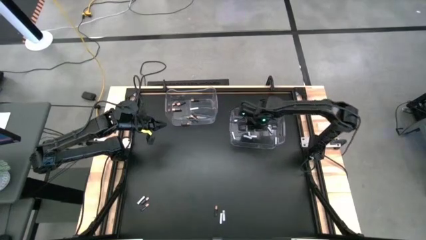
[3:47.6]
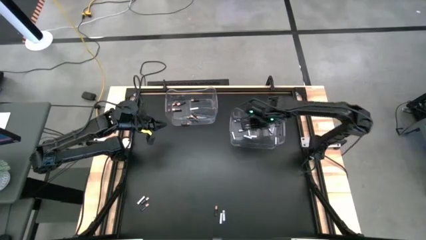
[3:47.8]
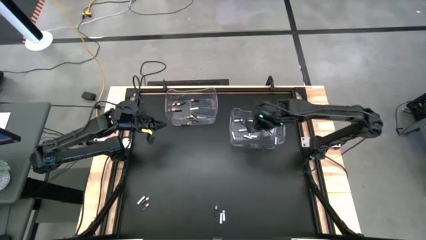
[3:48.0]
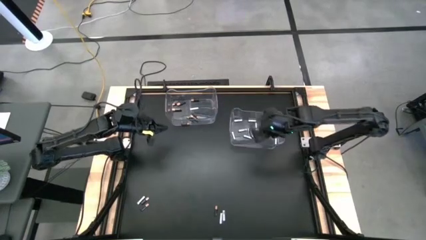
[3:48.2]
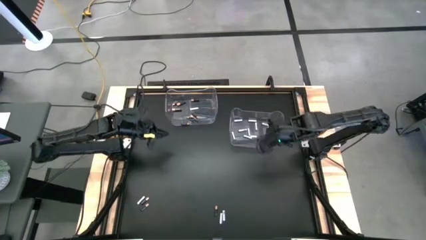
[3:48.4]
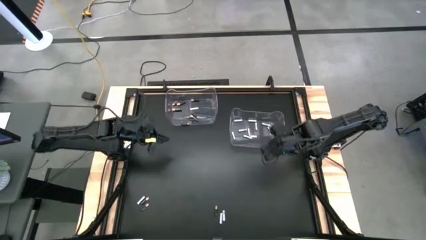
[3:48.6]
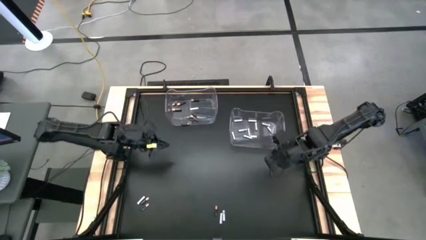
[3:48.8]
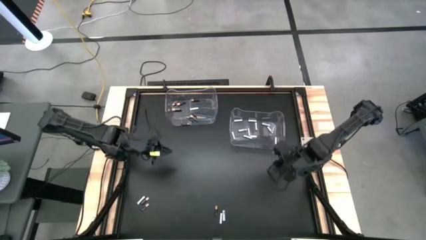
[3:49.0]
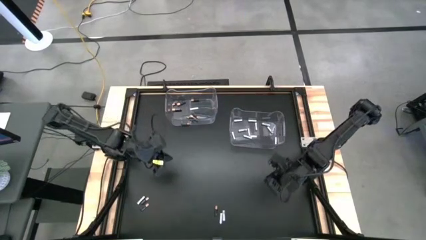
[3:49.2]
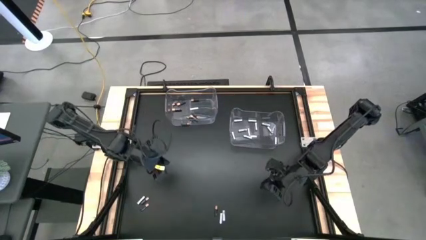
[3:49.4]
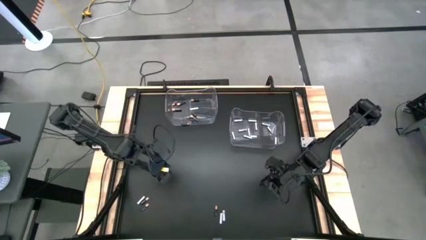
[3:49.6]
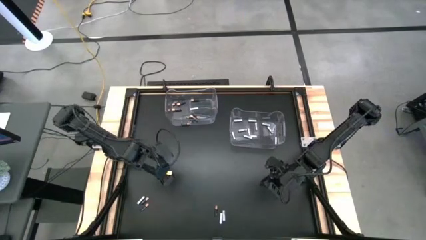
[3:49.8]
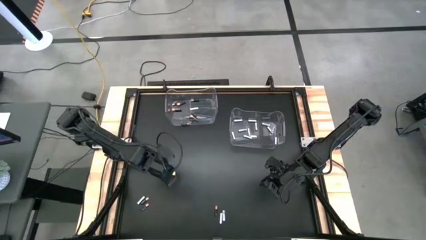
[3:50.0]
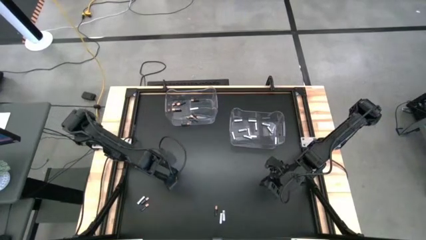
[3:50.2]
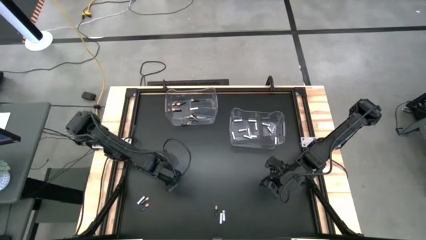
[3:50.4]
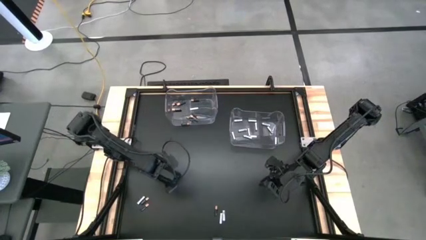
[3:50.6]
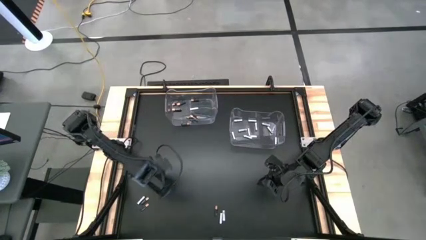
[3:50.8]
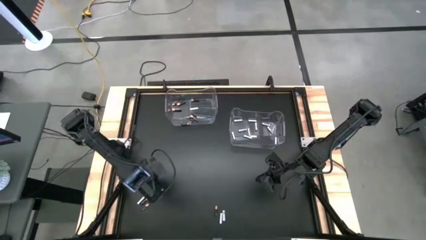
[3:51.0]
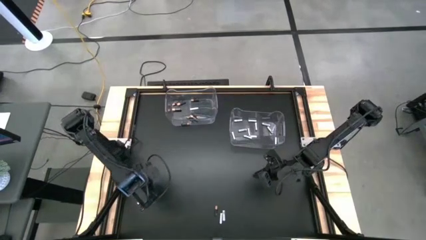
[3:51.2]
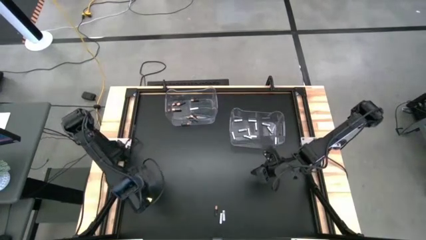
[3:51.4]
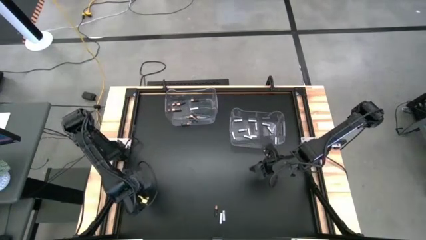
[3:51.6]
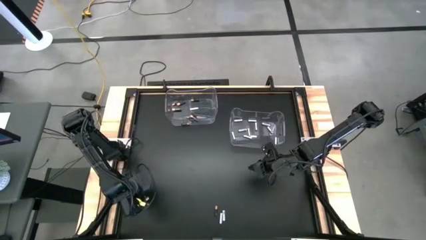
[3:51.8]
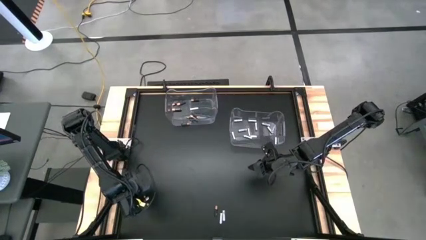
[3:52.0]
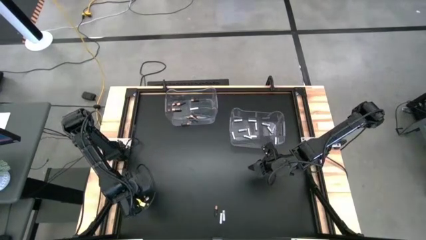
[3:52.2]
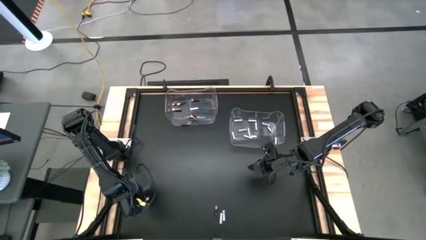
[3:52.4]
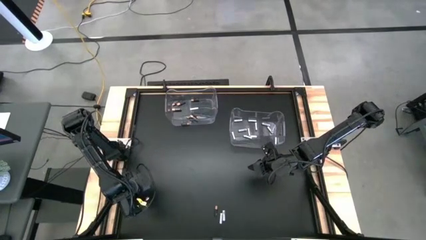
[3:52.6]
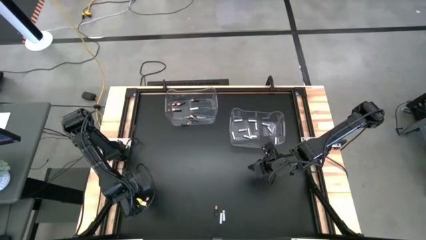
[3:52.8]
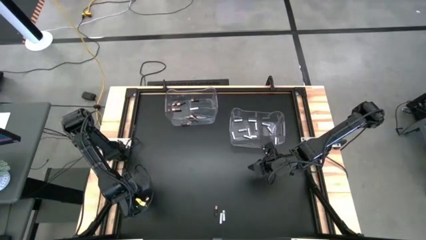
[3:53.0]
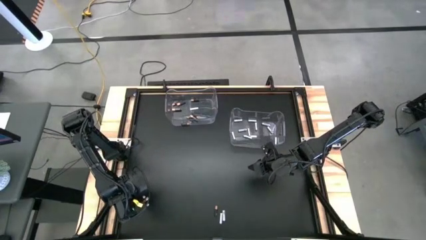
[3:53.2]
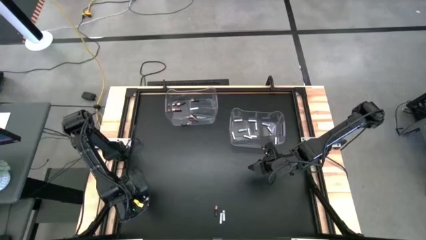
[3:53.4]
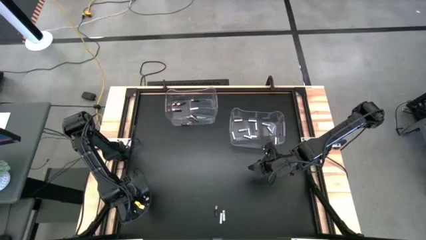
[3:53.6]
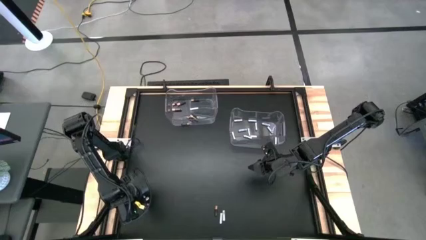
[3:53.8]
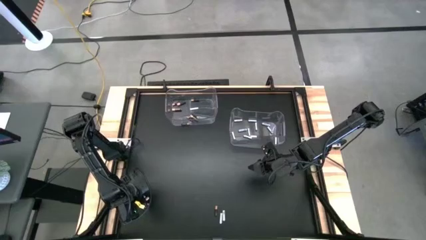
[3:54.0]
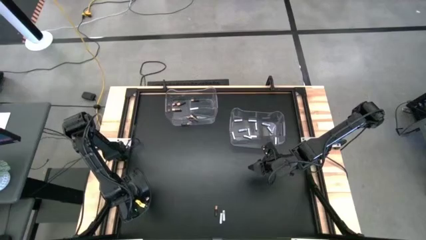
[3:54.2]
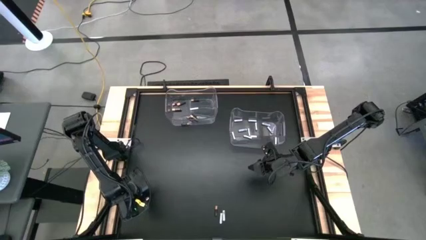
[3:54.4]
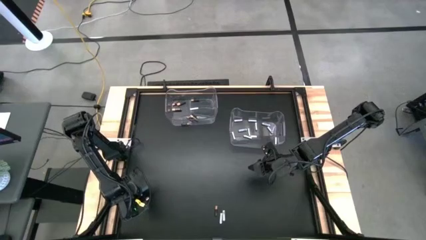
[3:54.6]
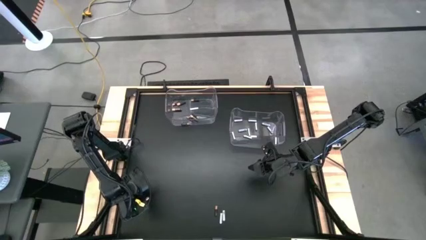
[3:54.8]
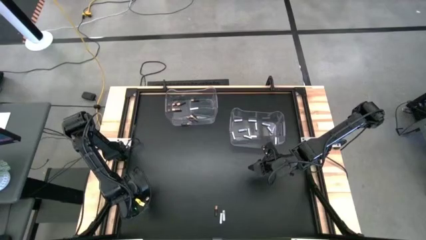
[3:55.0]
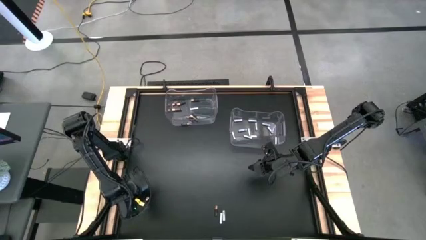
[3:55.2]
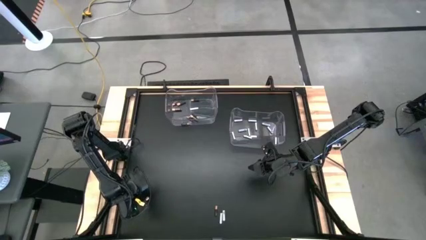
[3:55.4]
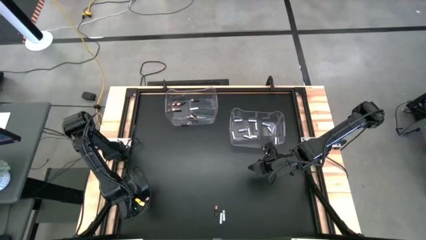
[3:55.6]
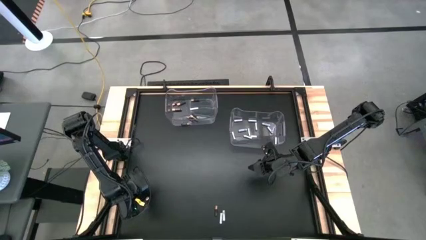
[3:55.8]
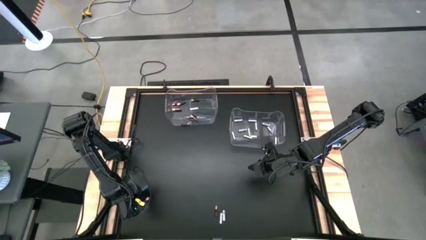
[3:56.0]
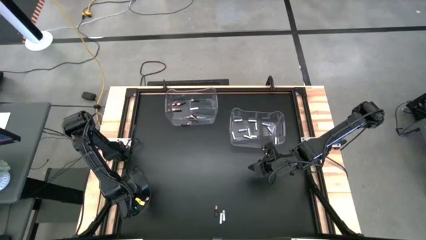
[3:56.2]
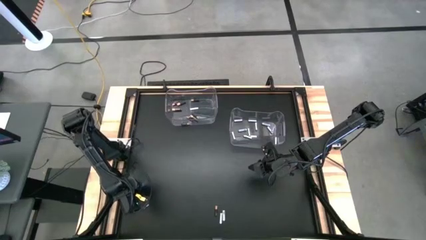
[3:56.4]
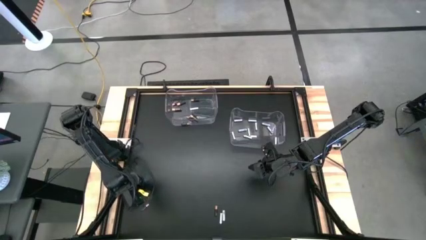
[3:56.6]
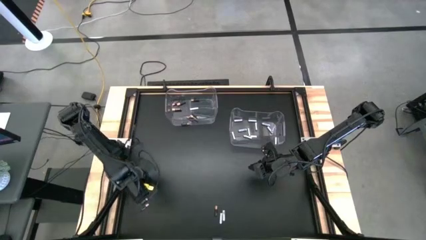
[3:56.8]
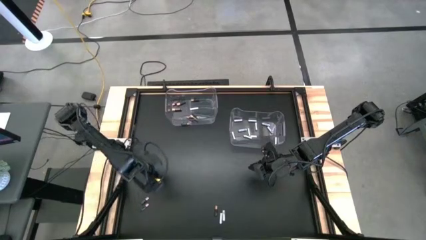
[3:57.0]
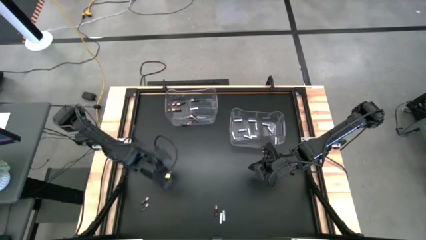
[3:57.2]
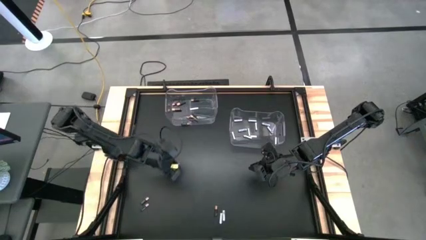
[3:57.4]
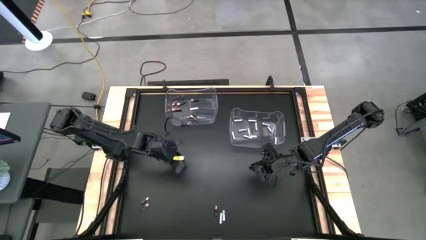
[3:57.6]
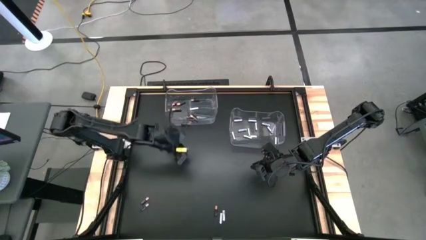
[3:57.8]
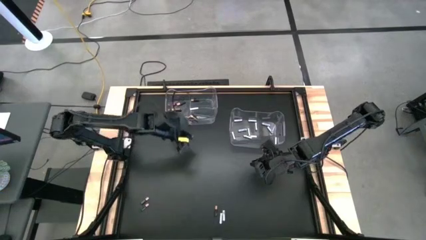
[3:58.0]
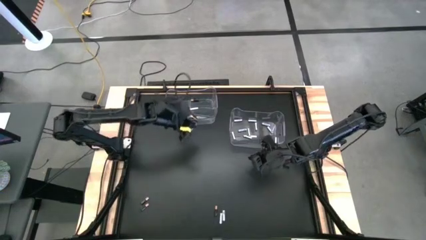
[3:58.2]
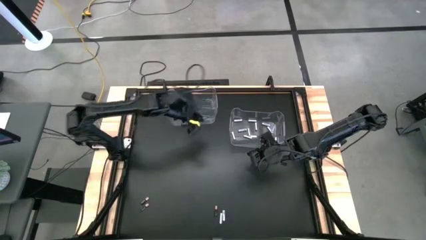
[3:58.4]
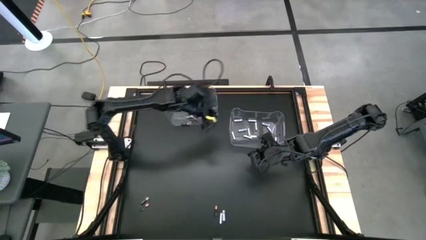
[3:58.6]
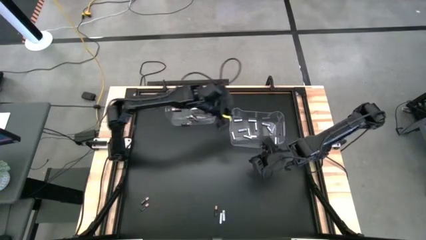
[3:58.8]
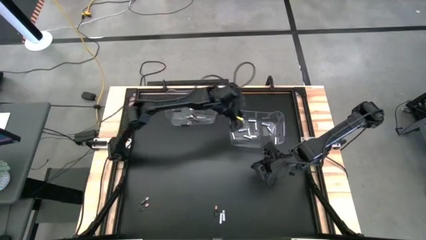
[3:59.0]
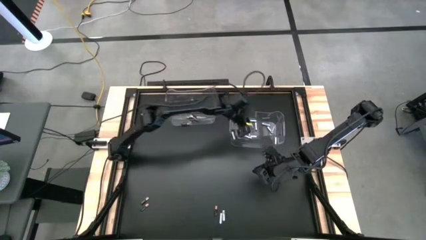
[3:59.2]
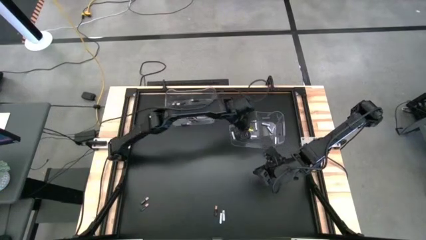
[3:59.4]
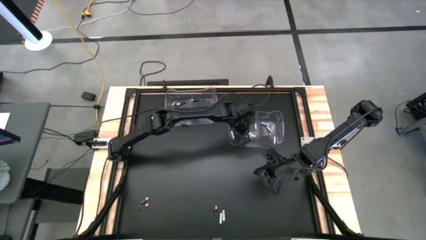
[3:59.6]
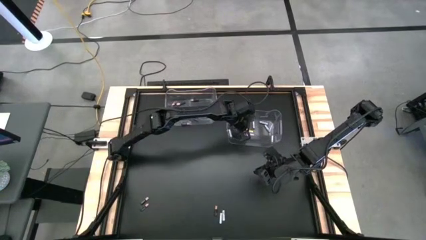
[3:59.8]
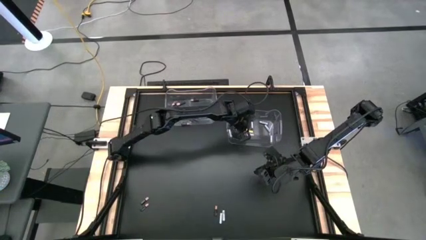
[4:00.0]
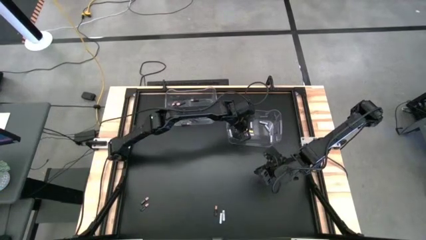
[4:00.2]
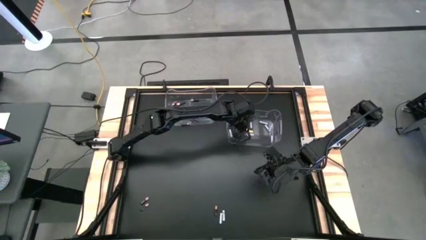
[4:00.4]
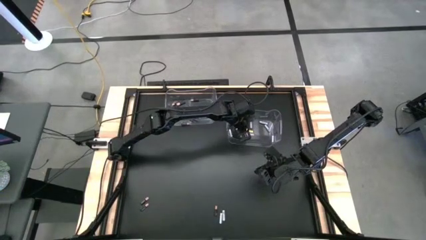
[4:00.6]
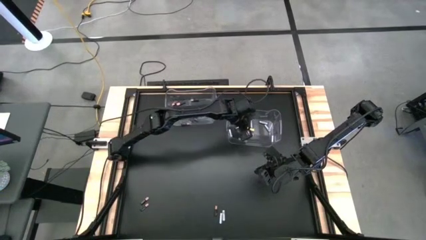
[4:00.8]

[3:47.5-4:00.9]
Task: Sort batteries
Put the white battery into the right transparent bin

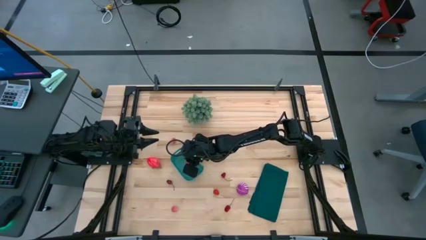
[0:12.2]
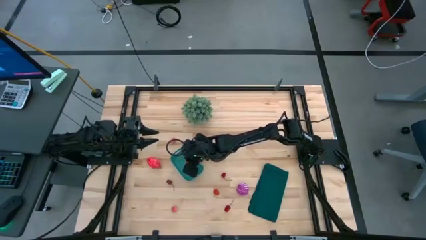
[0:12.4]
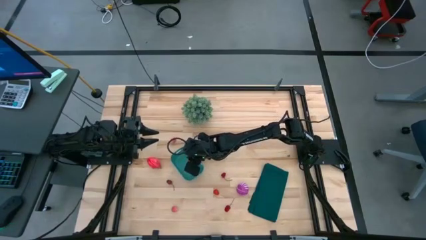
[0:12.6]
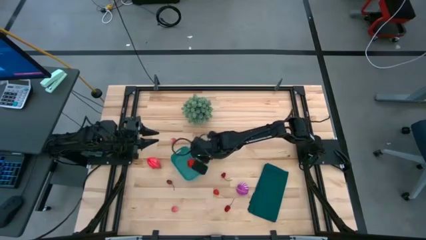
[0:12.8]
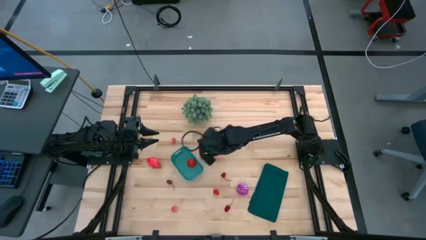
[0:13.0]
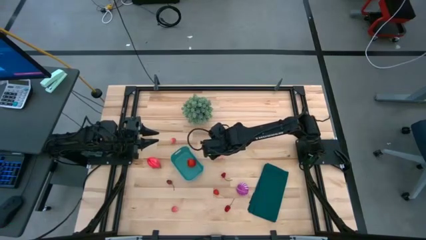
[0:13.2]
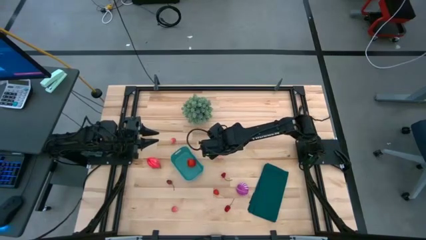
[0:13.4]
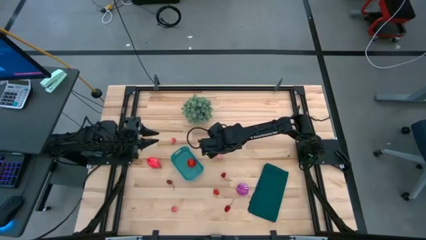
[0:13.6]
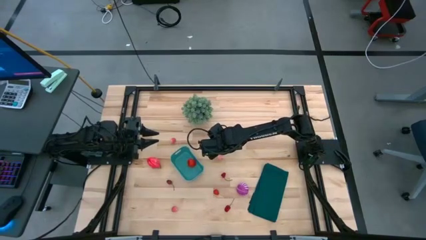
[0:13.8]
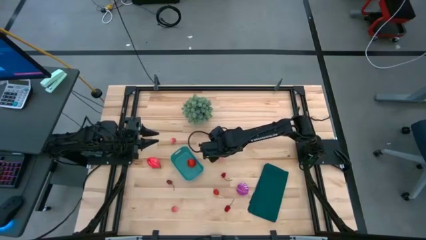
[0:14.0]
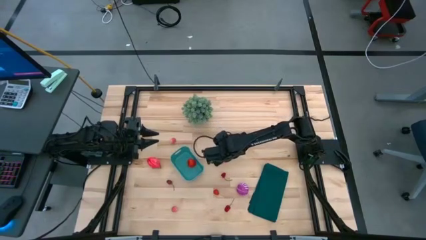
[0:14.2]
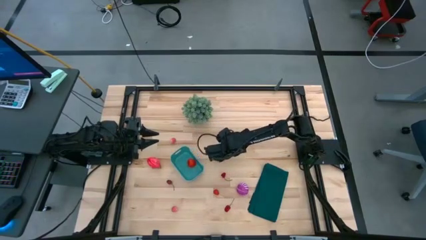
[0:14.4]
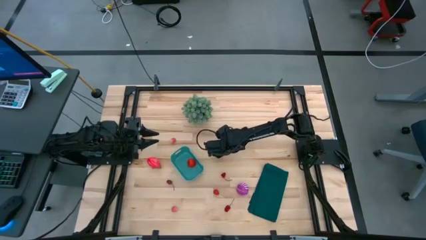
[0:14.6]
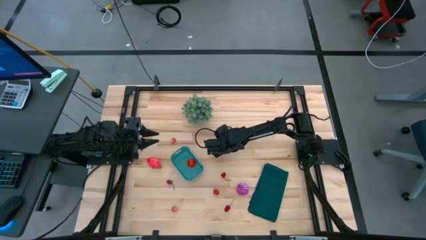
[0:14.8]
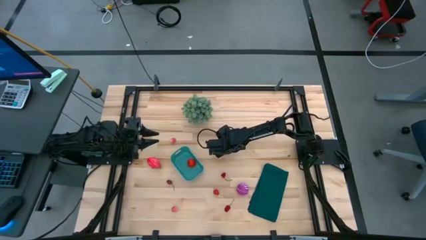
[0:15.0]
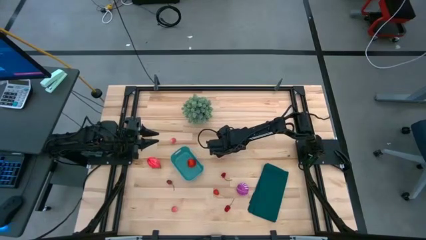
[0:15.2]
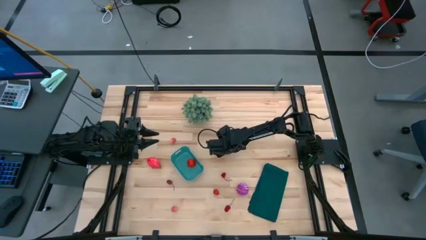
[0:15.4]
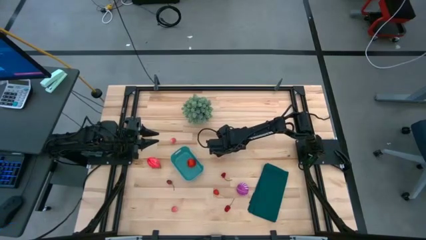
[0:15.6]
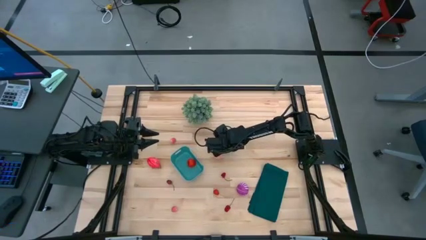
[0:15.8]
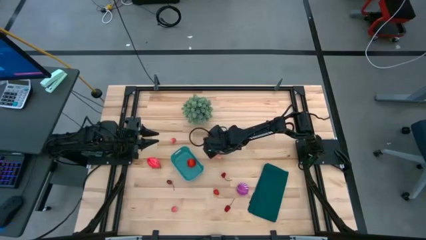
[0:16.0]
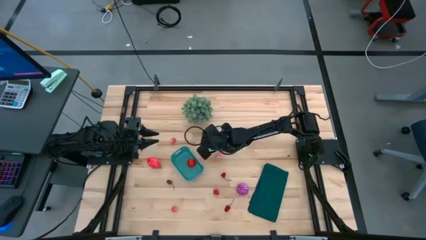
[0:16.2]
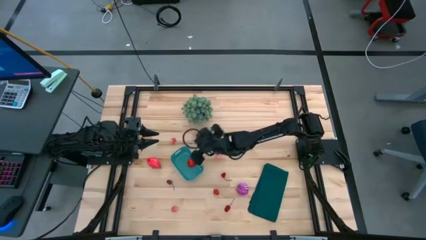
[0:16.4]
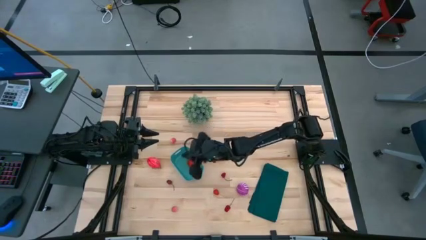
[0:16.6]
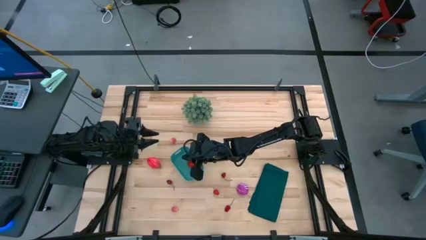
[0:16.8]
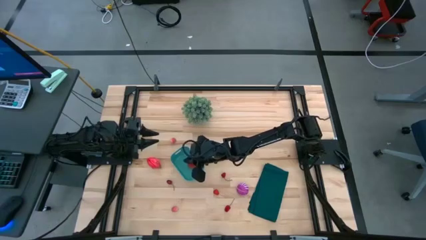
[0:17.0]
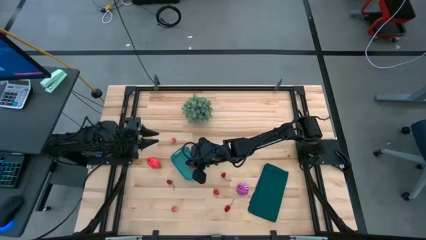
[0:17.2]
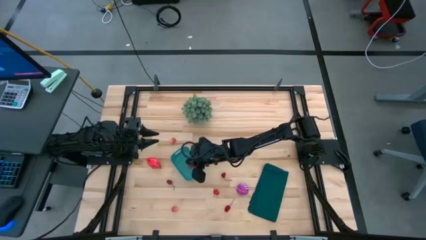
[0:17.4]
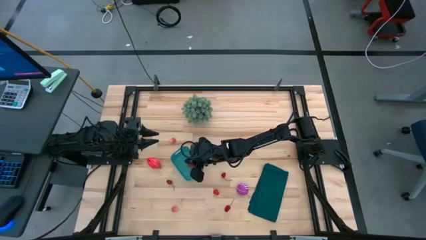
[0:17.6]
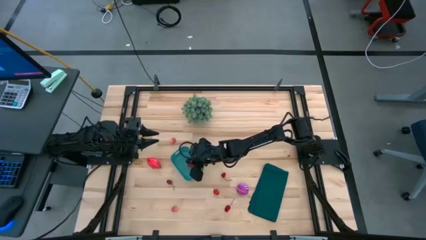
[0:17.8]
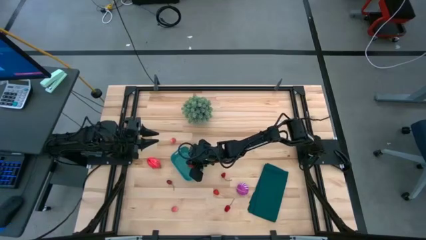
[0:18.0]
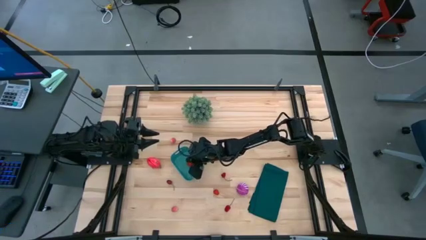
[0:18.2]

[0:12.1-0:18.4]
Task: Pick and placing Produce into tupperware
Put the red cherry into the green bin
